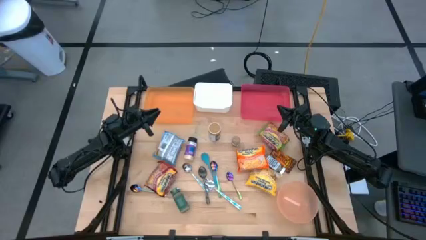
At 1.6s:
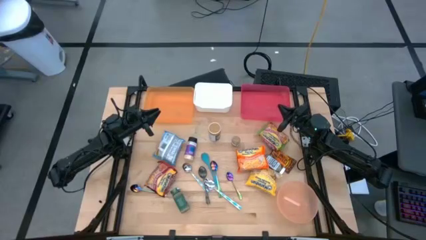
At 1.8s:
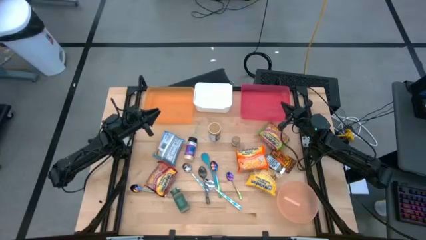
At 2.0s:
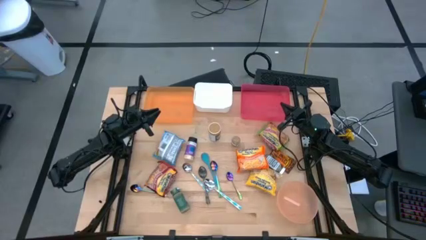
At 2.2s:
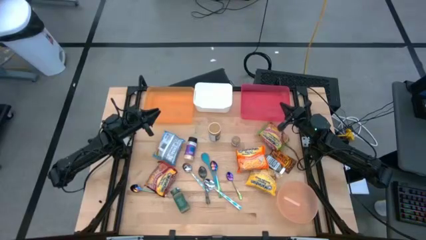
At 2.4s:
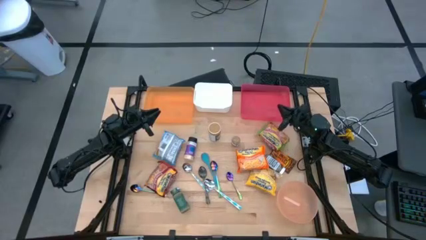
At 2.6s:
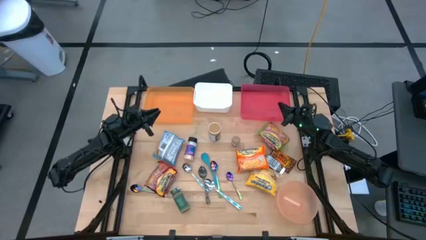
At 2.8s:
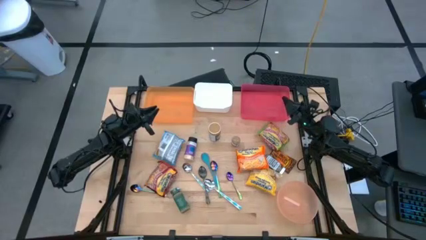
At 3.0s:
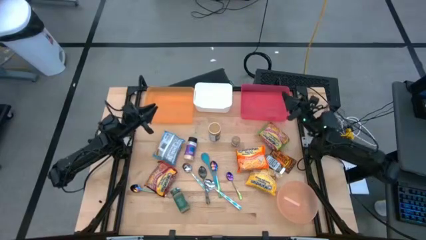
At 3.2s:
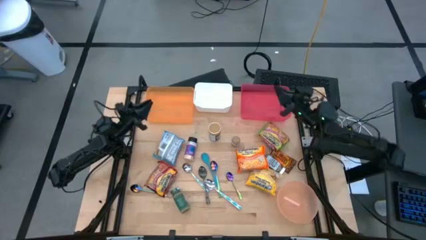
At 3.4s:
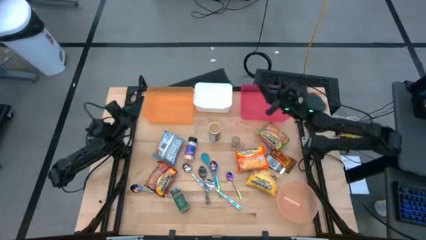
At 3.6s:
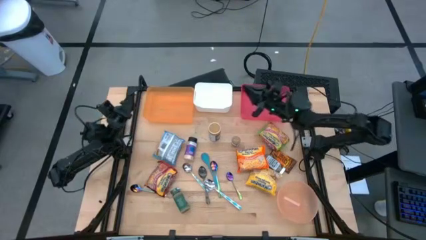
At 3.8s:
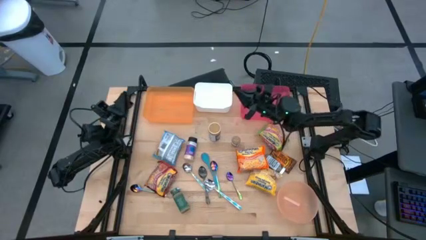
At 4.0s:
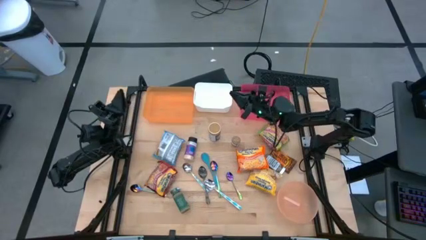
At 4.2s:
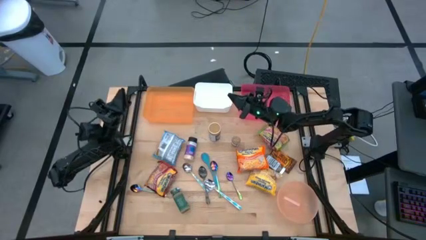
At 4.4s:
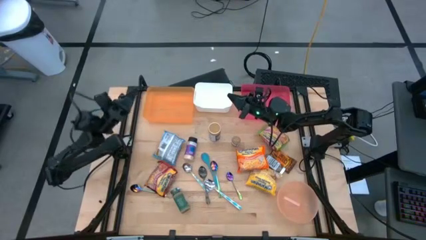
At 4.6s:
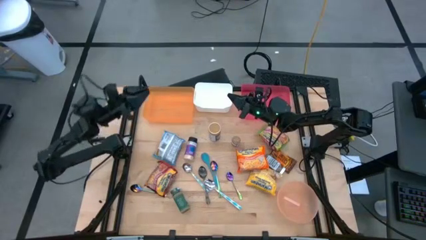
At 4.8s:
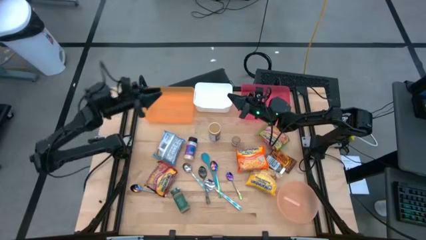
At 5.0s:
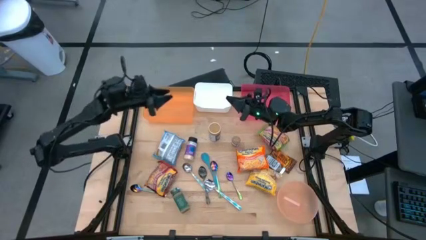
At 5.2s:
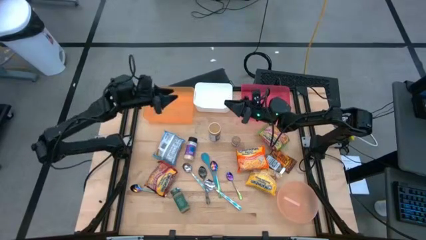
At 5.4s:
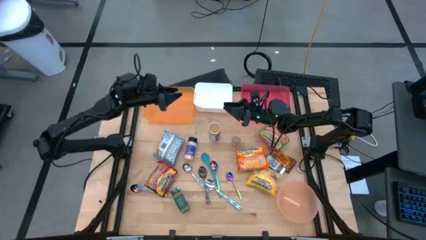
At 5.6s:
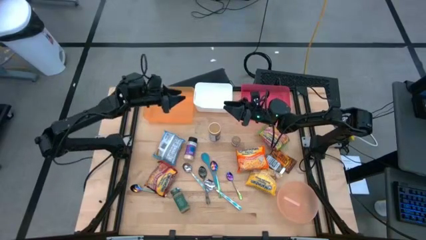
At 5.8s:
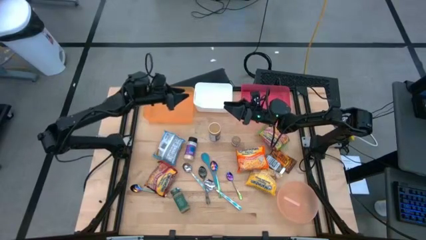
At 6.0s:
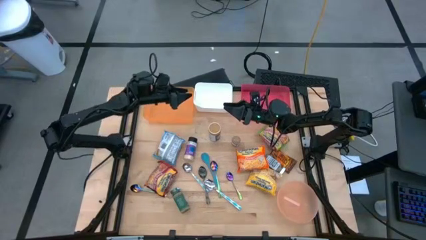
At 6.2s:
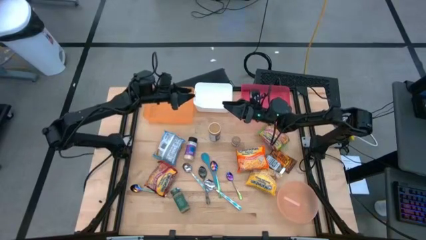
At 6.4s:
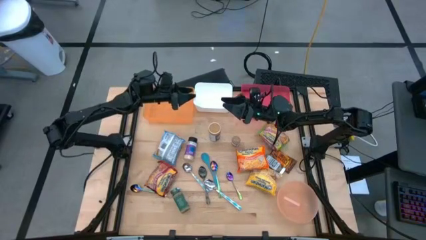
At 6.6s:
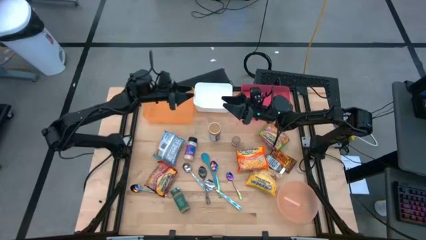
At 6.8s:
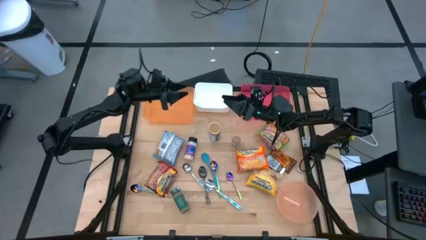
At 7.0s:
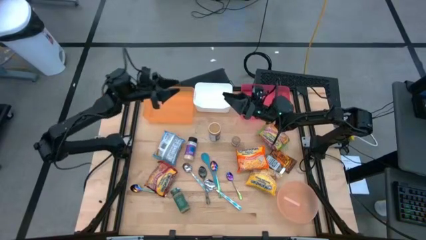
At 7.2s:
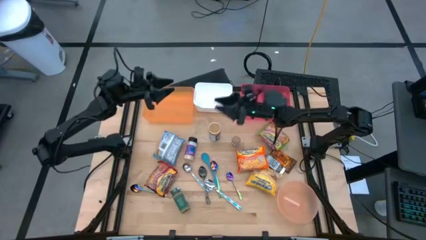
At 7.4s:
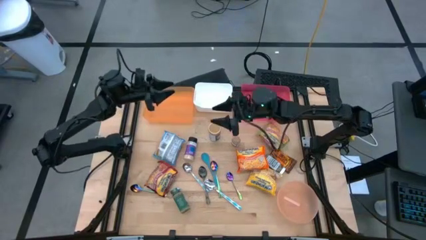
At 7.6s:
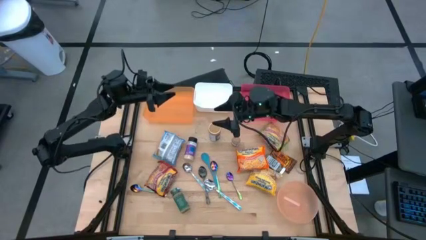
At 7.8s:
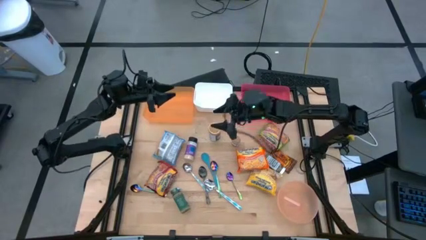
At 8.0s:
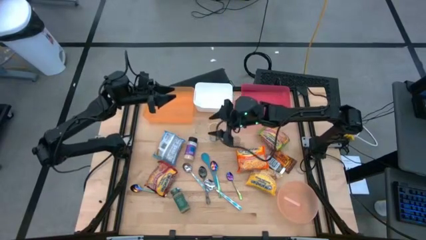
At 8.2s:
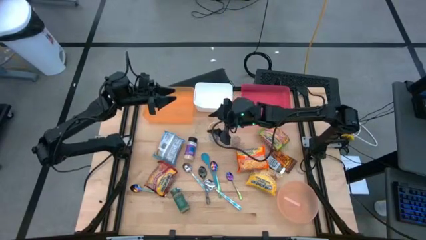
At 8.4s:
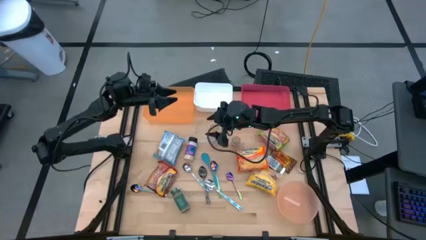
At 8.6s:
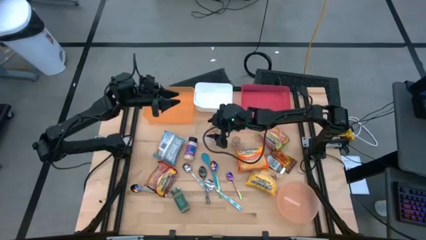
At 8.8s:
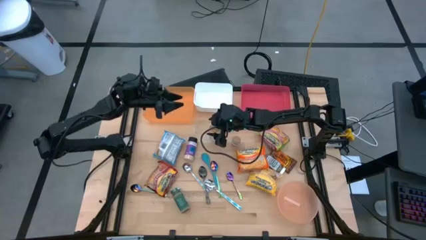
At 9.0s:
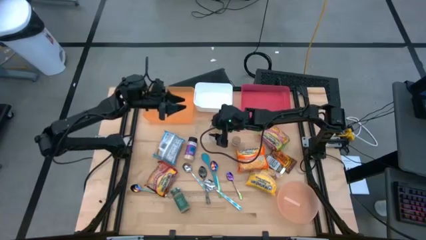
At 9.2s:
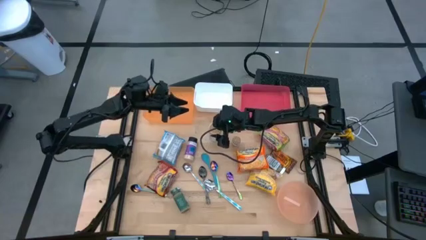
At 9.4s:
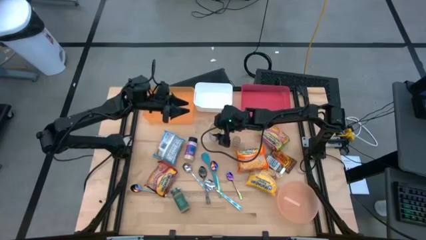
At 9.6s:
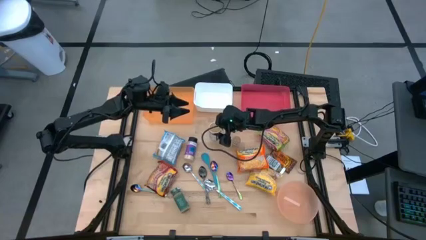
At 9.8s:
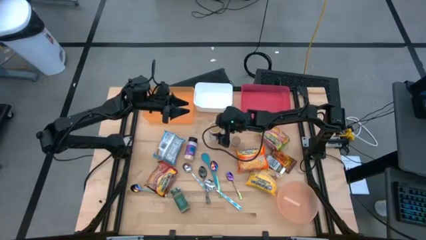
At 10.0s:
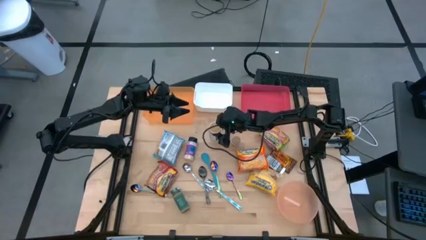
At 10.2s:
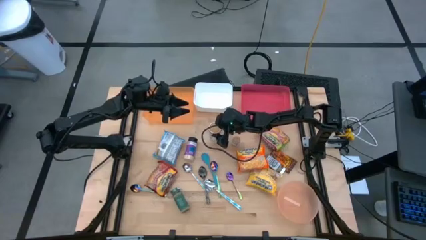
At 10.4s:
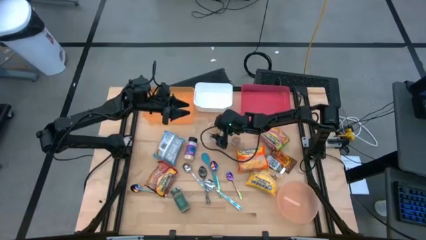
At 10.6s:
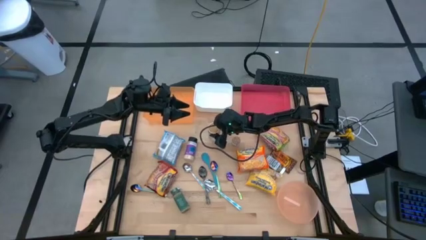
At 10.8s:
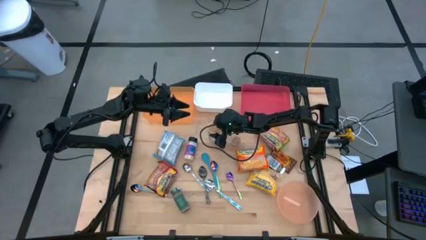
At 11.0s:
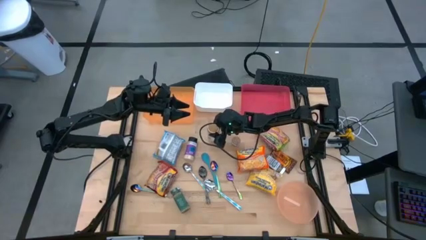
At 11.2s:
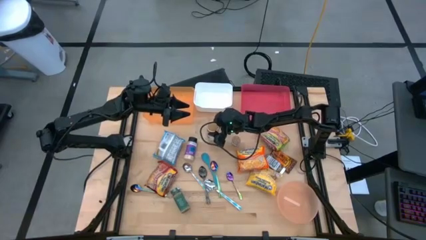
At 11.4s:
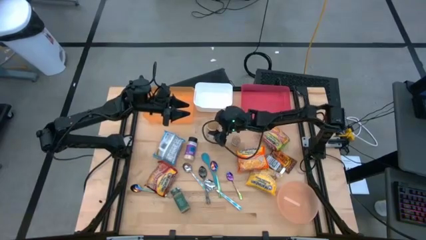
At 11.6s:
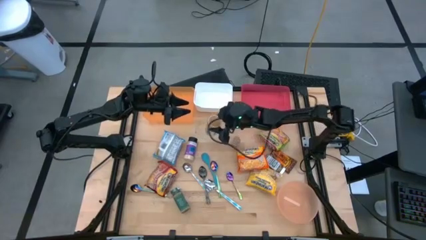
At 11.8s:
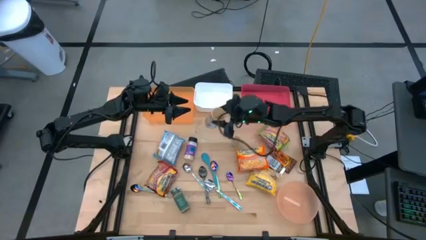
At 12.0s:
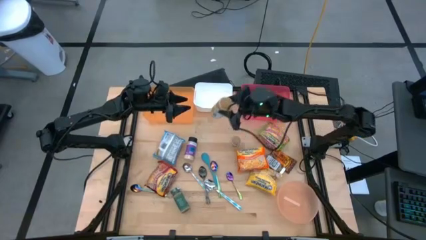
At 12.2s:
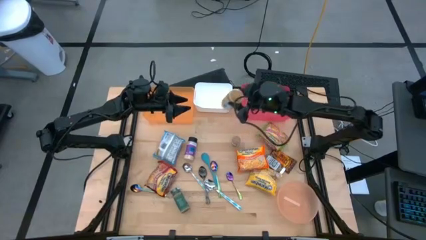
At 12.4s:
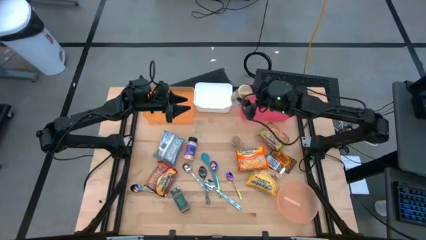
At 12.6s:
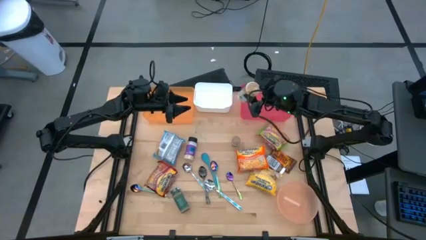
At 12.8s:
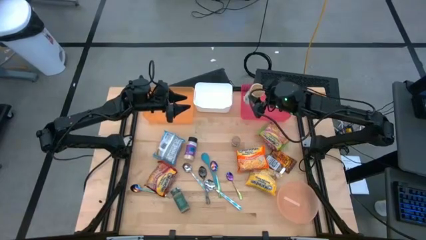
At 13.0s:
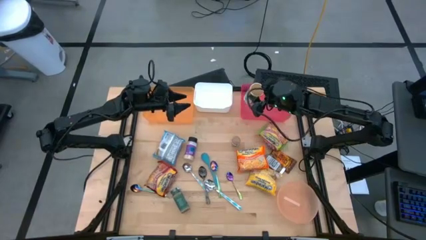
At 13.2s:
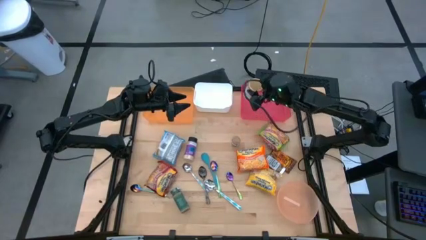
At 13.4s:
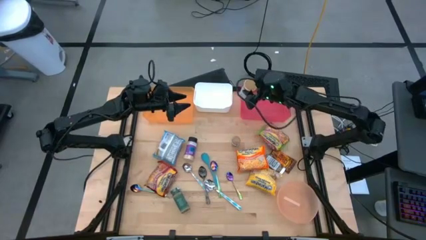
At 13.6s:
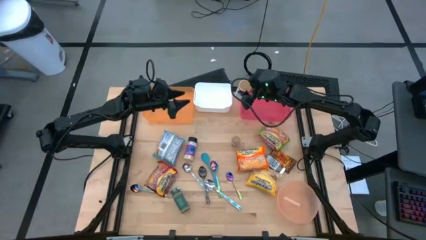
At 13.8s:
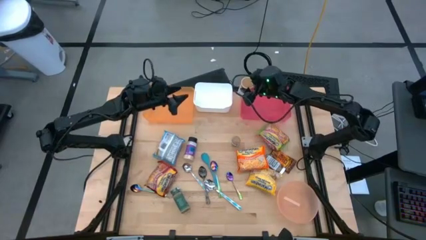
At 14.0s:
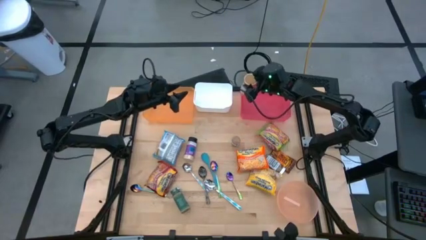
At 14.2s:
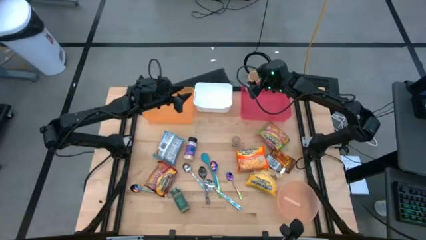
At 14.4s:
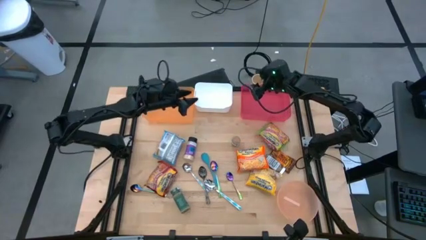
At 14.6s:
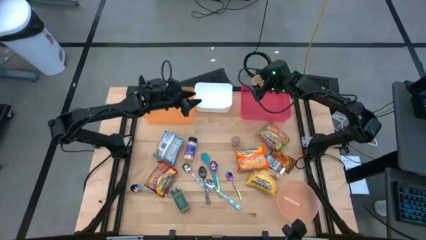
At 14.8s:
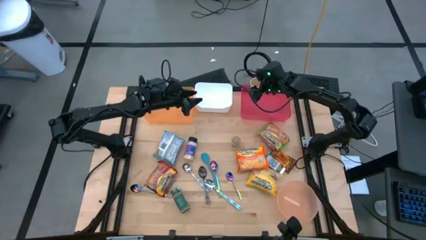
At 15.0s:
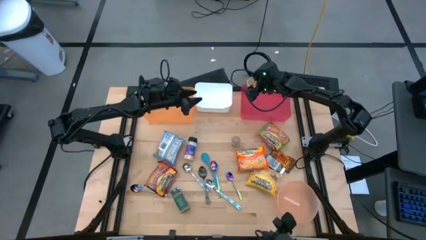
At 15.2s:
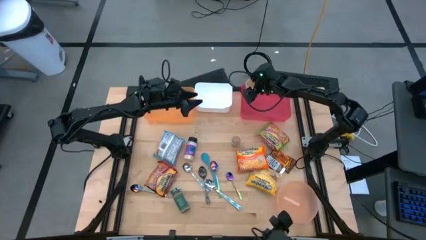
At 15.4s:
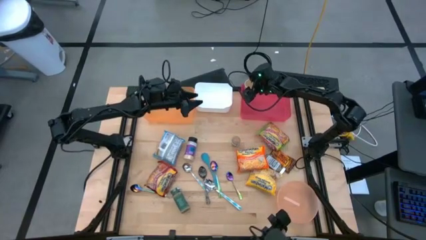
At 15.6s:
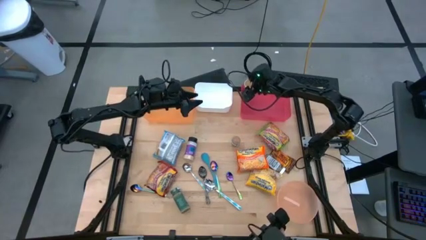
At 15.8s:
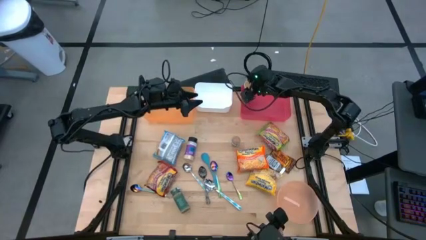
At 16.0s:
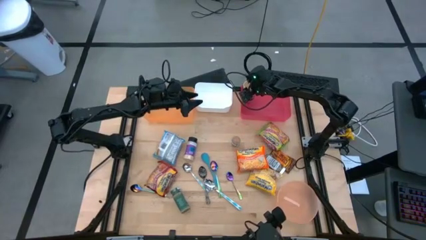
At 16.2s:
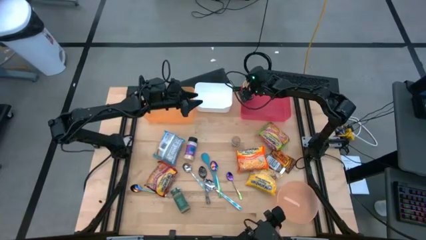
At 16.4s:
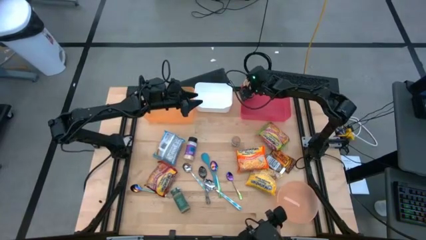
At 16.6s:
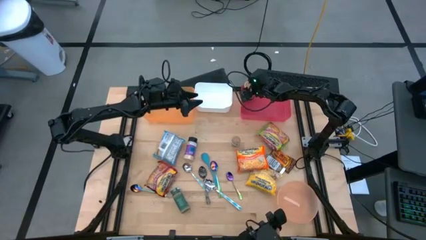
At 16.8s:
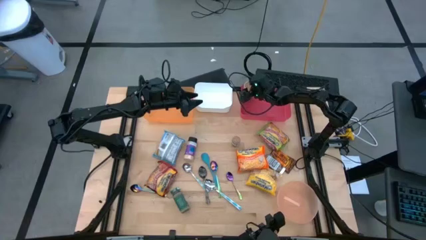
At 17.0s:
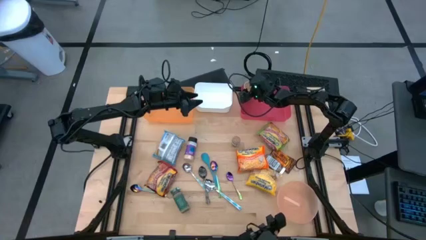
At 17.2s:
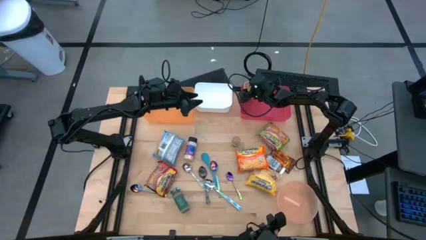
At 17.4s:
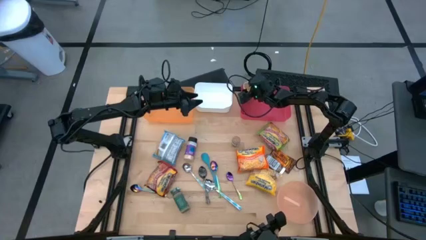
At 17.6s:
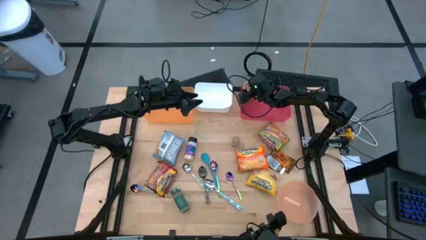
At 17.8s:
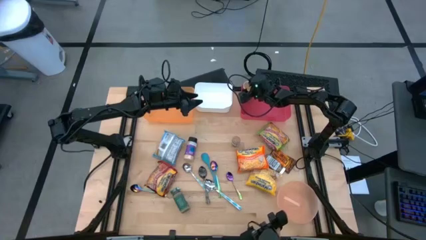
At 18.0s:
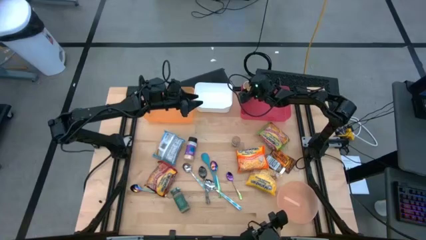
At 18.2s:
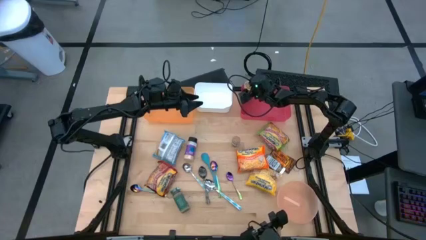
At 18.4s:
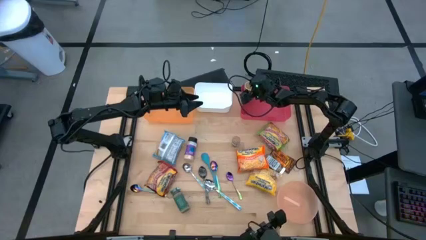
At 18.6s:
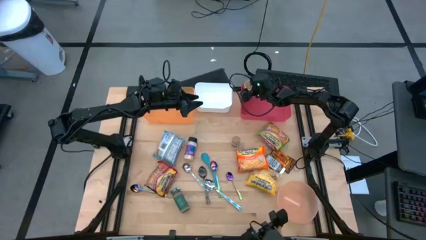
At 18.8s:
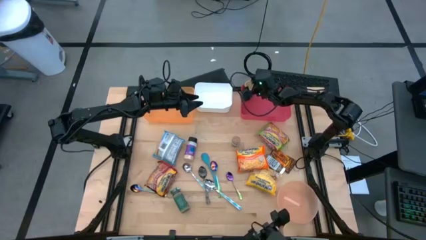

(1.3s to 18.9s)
Task: Pick & Place Food Item
Put the gold spice bottle into the red bin
